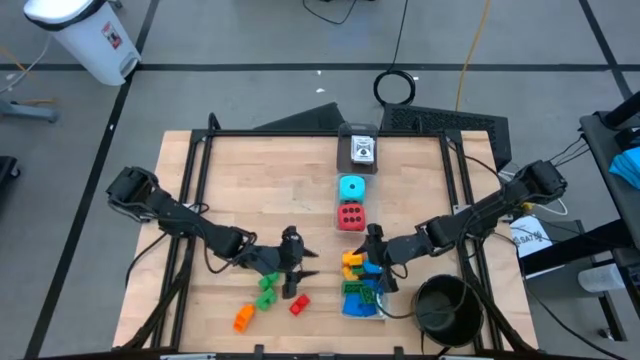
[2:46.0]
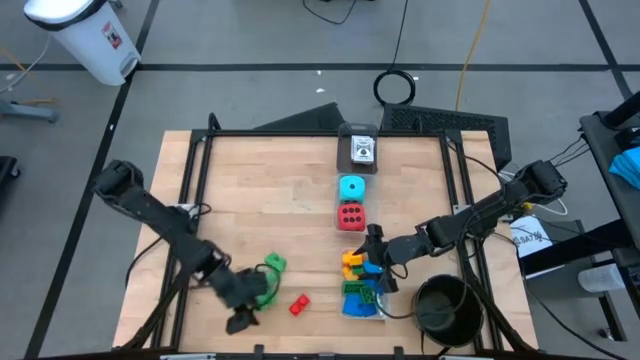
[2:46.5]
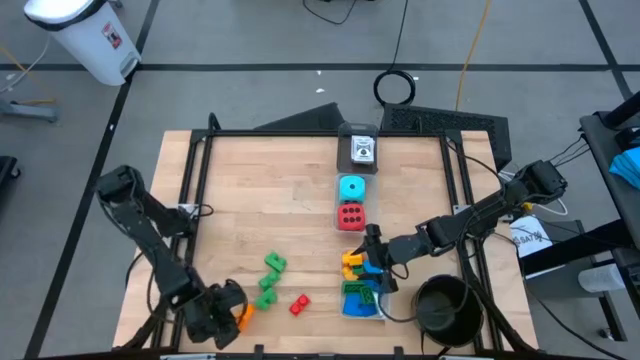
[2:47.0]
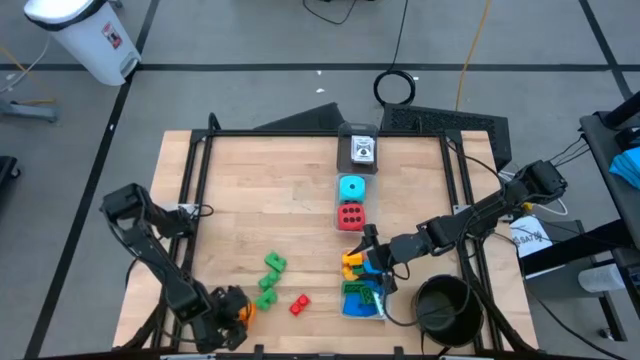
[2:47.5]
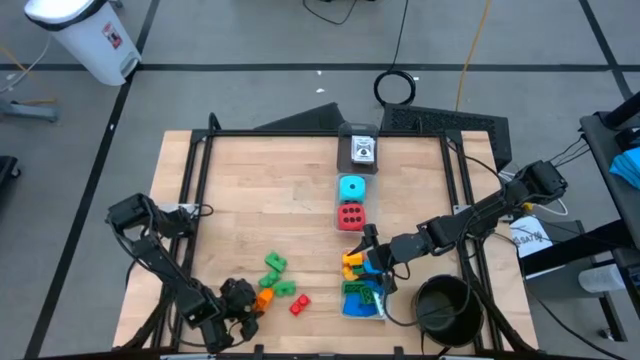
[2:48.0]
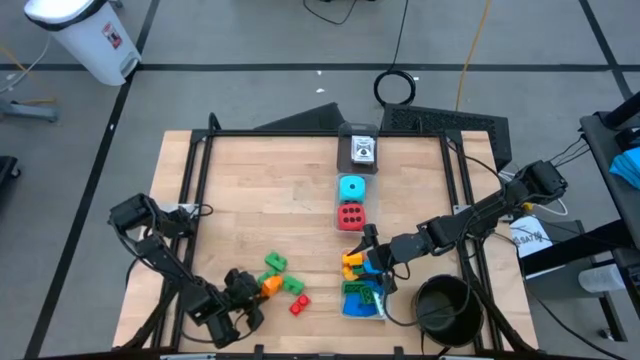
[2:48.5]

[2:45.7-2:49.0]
Task: Pick & Place Toys
Put the orange 2 stud game piece into the bottom transparent bin

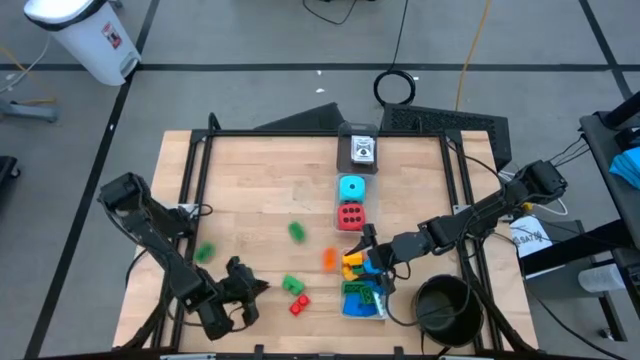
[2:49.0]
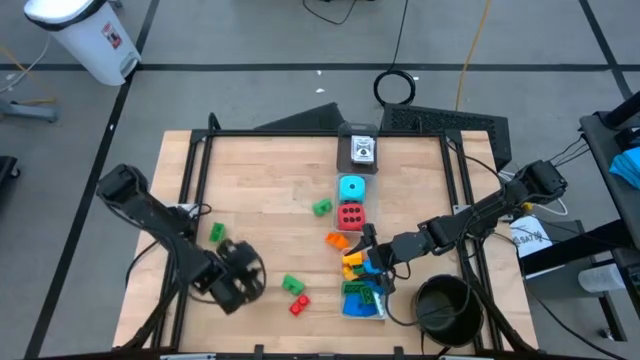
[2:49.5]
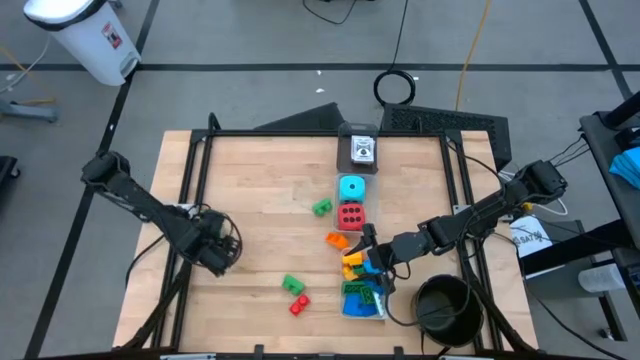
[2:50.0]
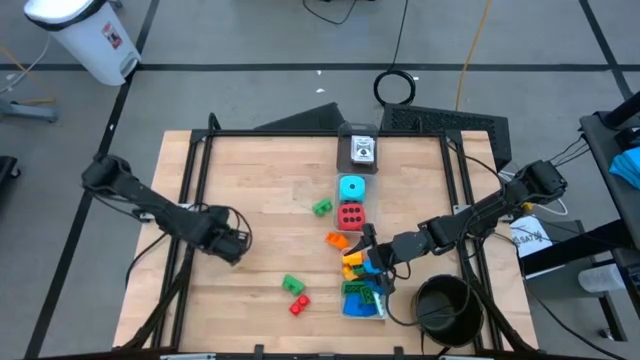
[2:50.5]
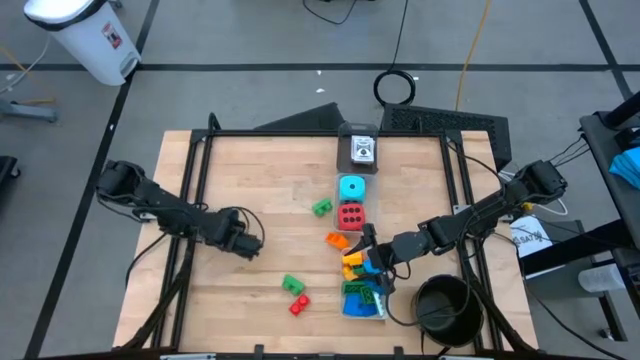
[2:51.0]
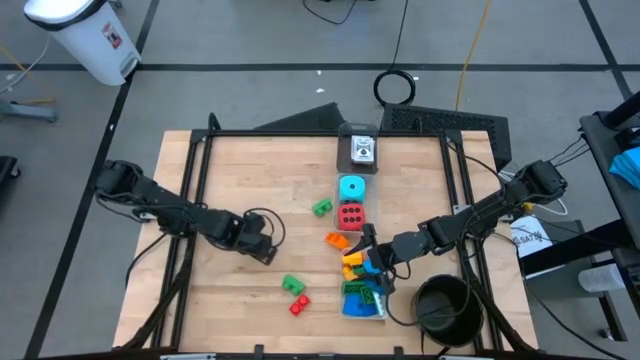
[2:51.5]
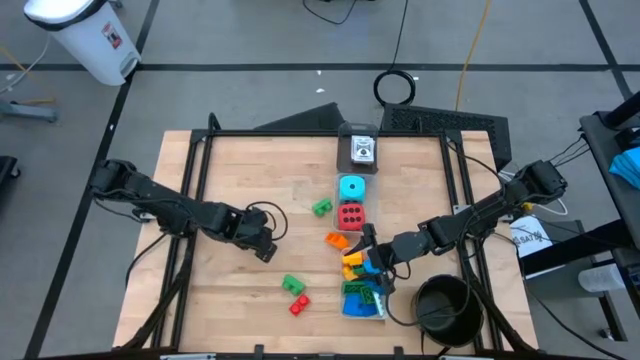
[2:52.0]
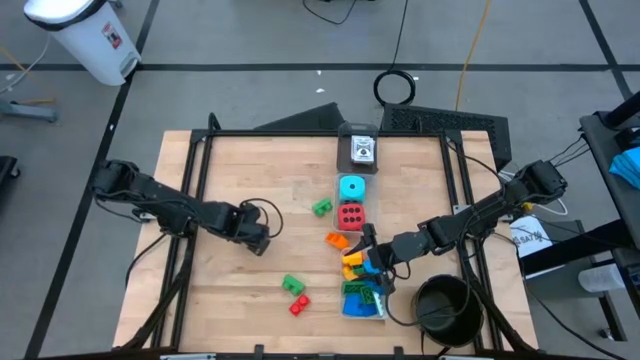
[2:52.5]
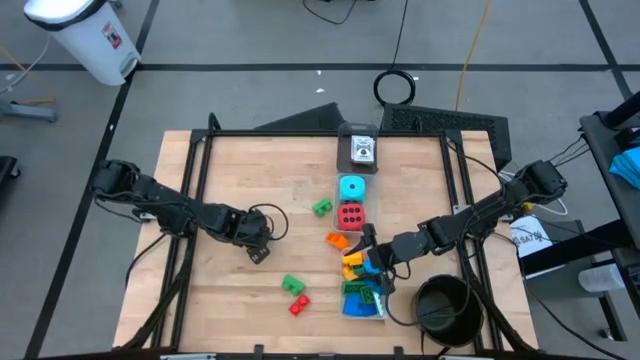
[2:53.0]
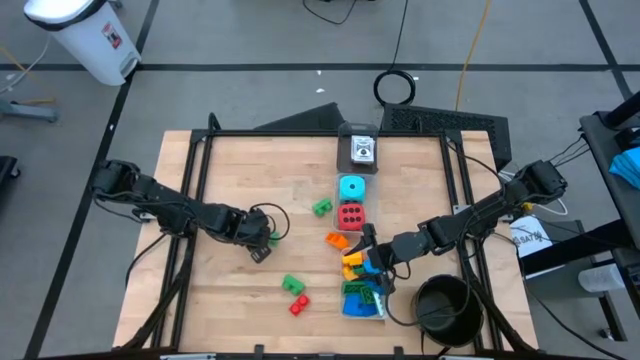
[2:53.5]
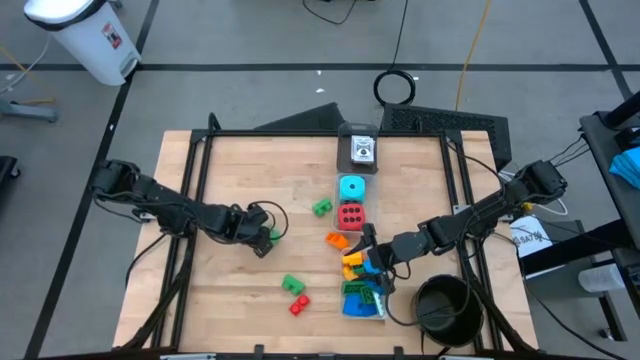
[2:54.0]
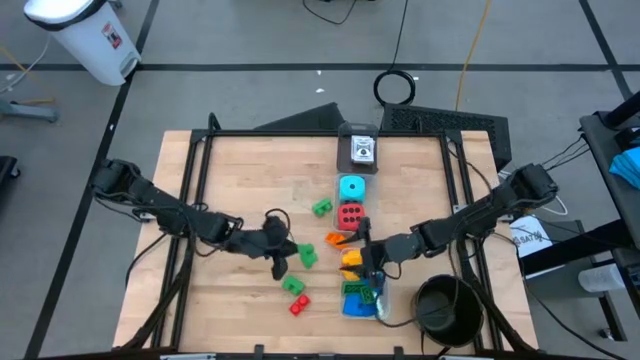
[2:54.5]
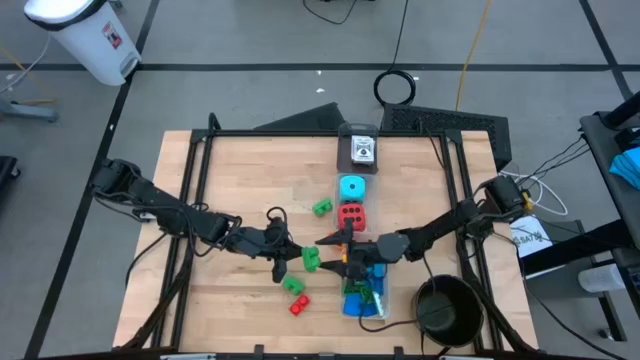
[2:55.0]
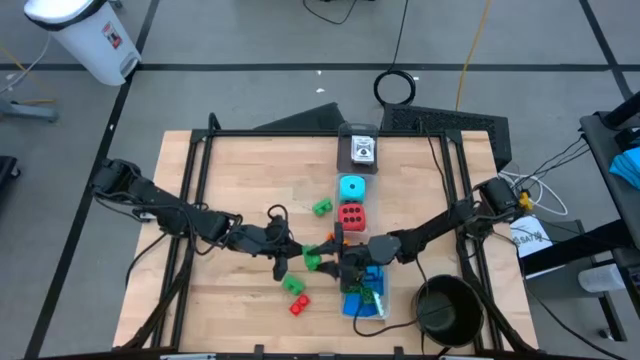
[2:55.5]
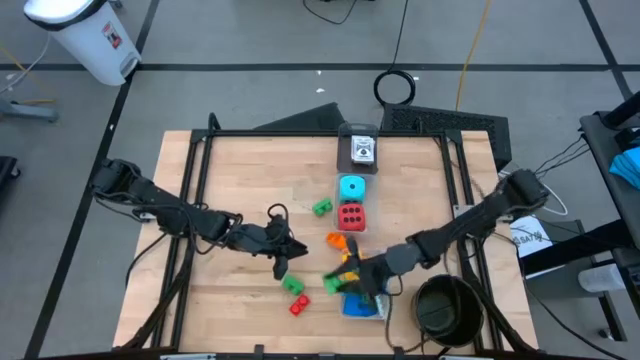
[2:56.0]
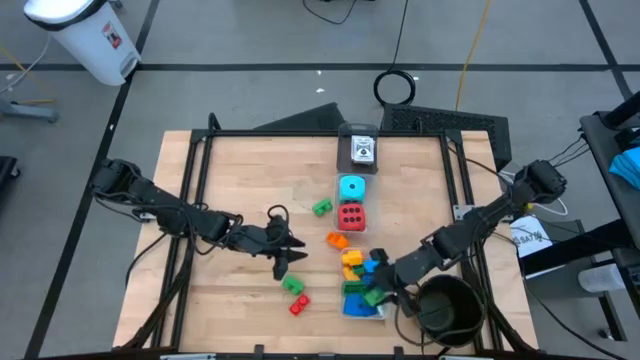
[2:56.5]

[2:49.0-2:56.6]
Put the green 2 stud game piece into the bottom transparent bin

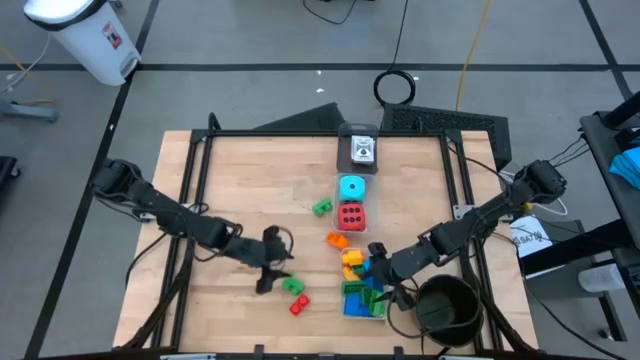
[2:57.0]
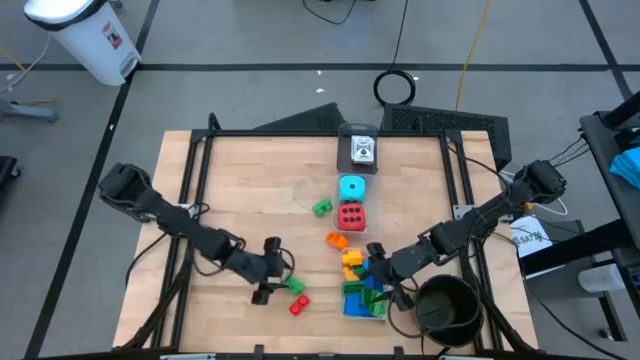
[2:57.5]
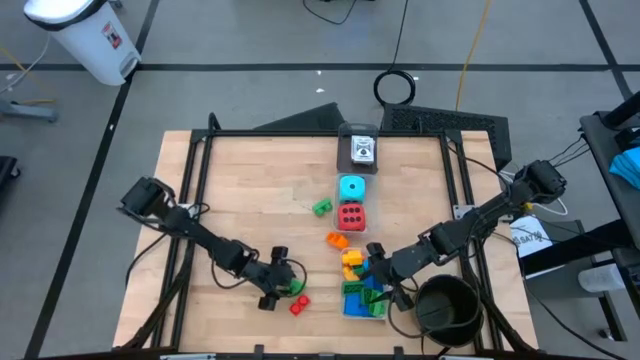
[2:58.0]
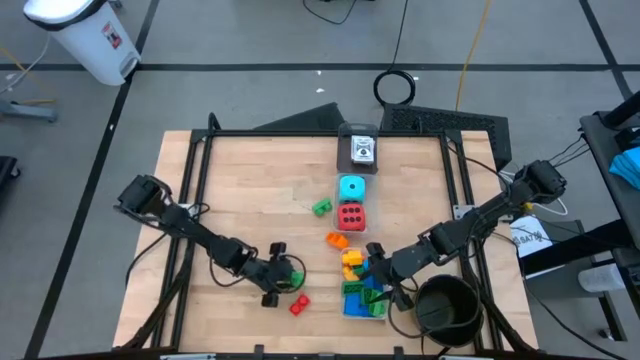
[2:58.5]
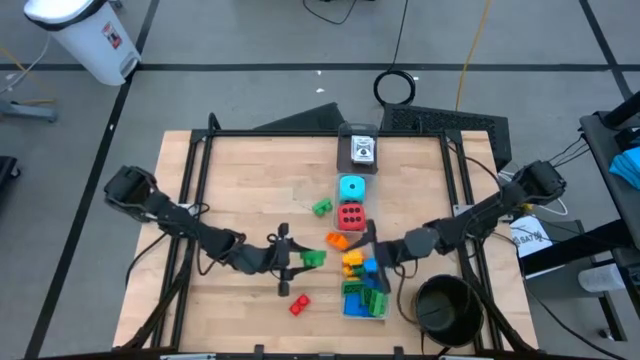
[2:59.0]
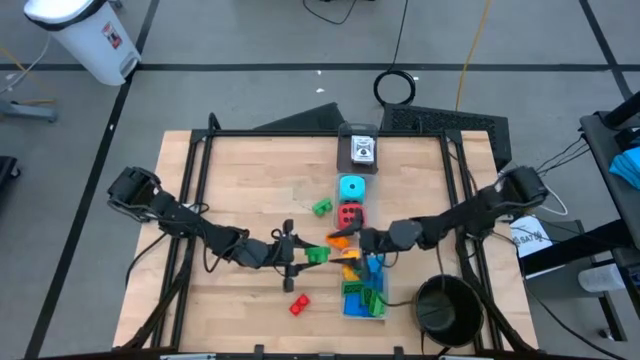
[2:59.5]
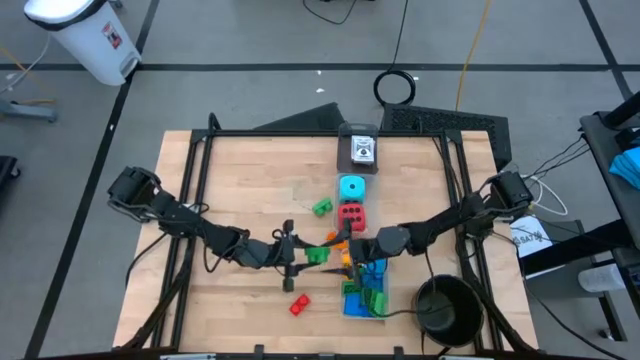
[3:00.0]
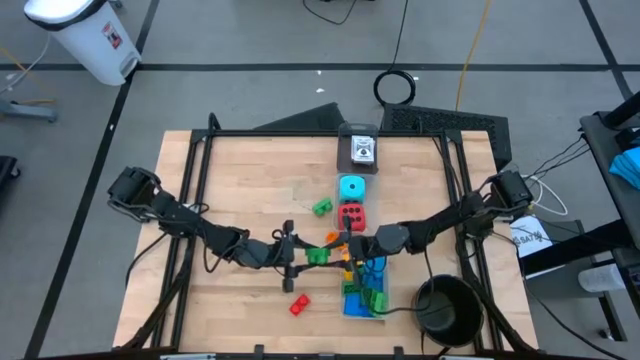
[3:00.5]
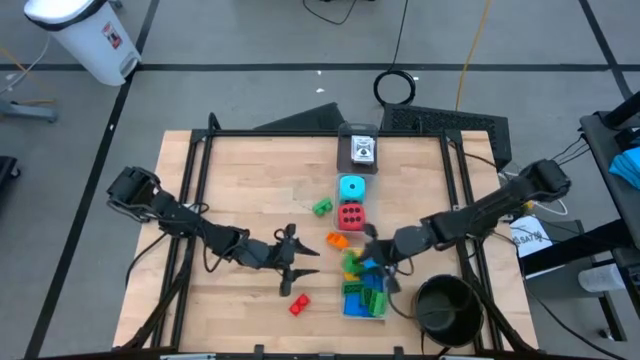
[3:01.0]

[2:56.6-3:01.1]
Put the green 2 stud game piece into the bottom transparent bin

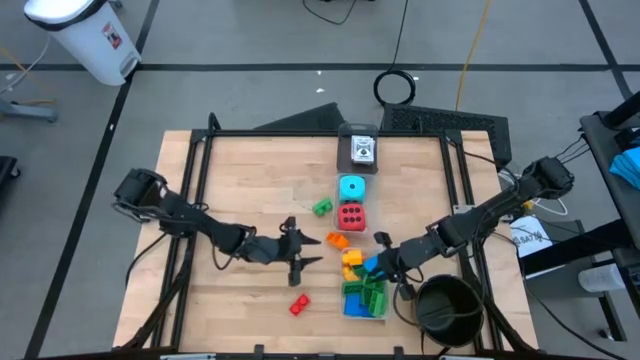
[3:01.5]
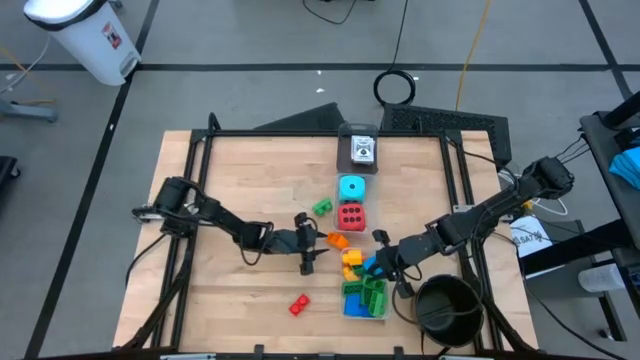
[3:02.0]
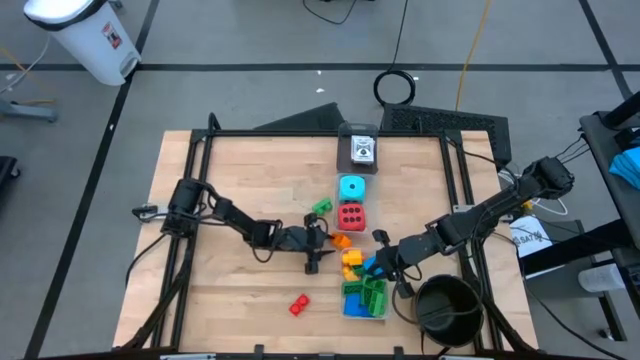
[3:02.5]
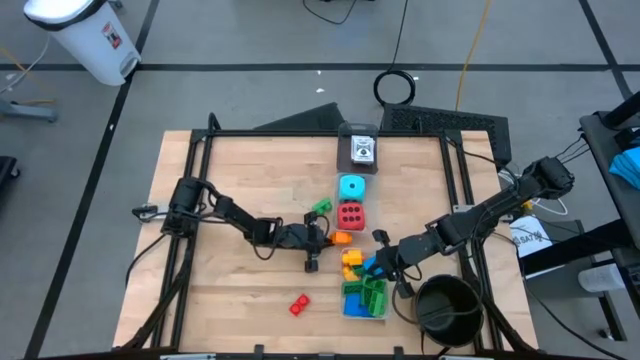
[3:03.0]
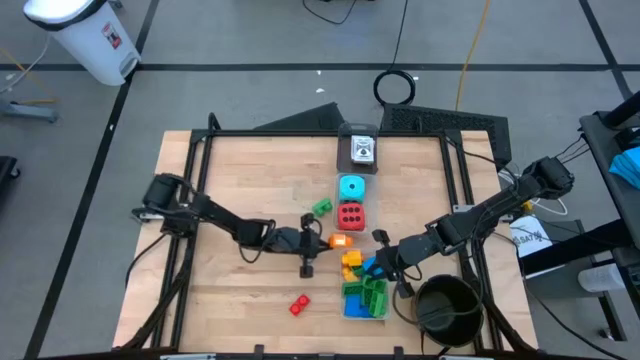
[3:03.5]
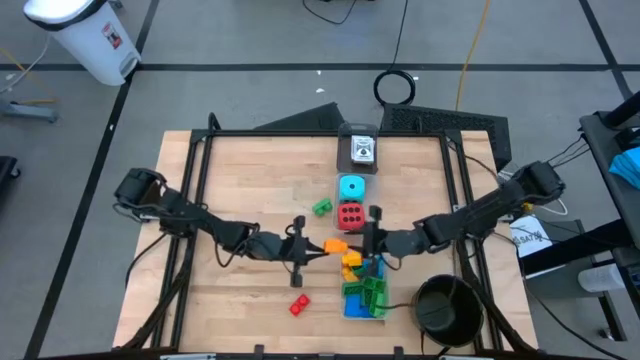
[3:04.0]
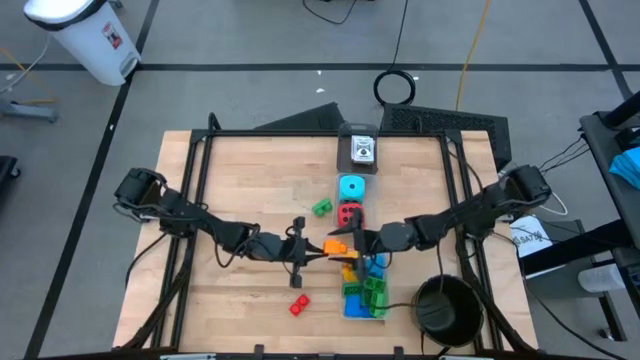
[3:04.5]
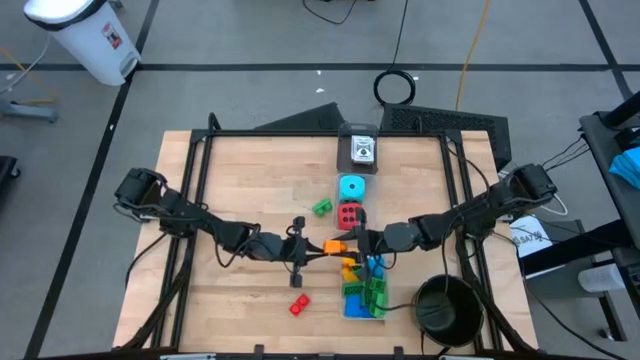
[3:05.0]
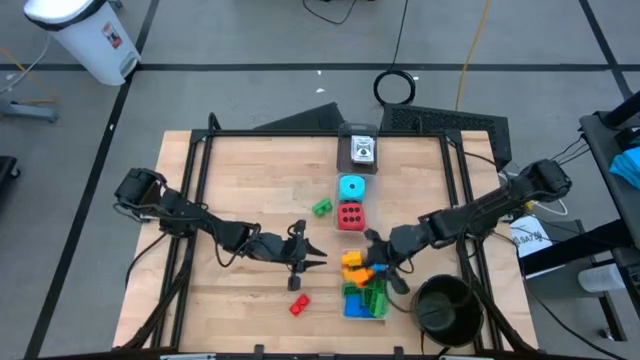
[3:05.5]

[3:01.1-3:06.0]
Put the orange 1 stud game piece into the bottom transparent bin
